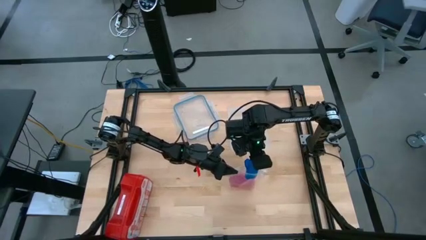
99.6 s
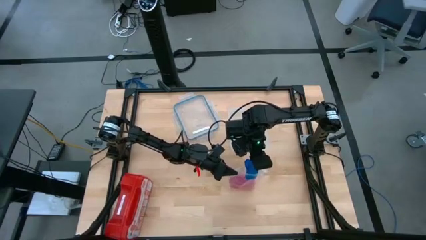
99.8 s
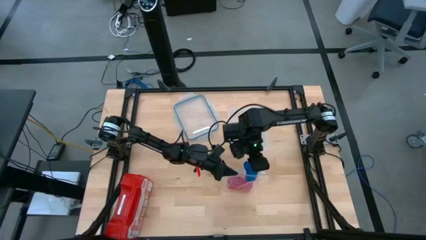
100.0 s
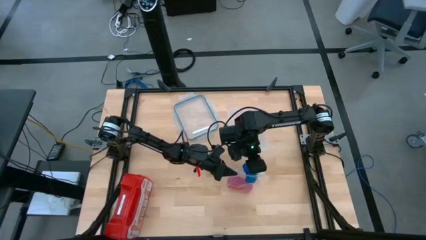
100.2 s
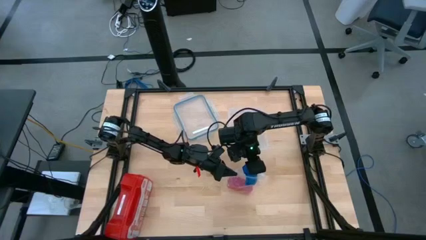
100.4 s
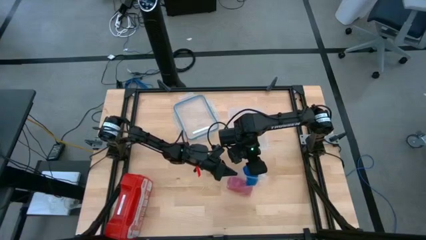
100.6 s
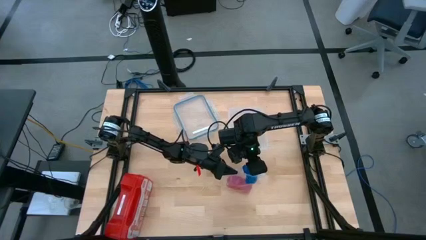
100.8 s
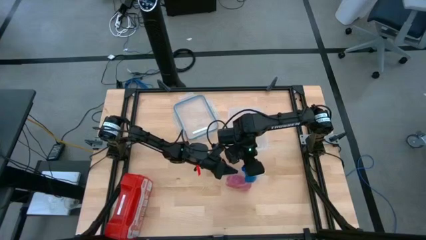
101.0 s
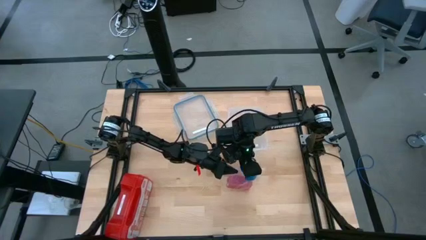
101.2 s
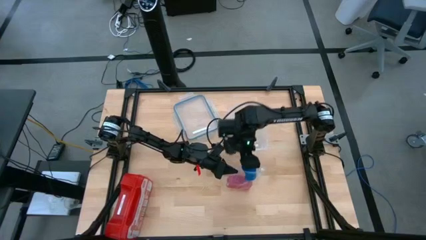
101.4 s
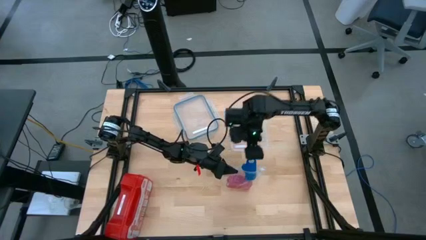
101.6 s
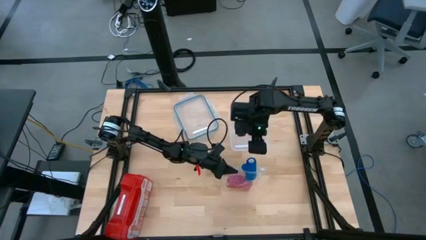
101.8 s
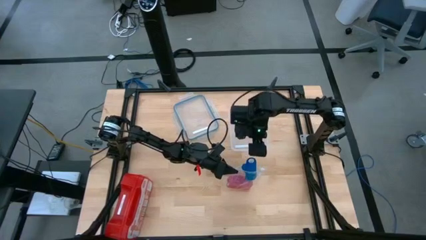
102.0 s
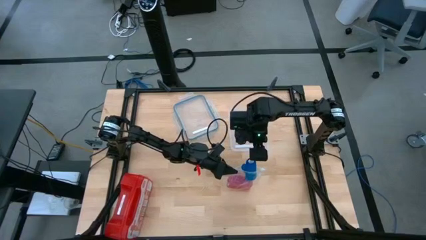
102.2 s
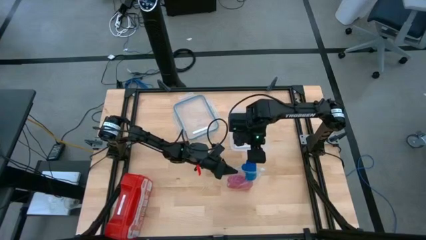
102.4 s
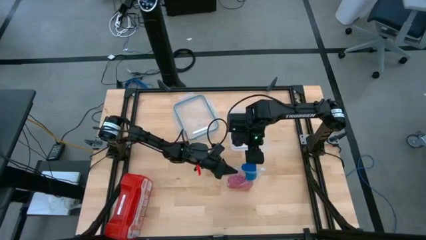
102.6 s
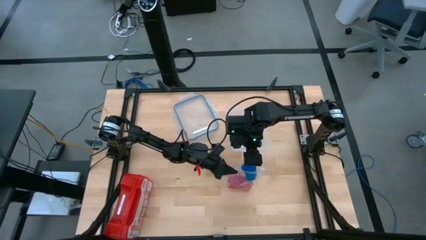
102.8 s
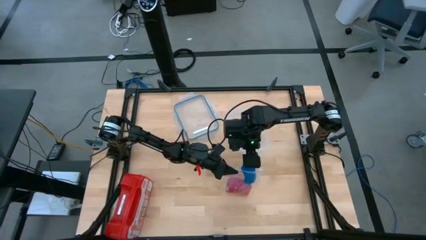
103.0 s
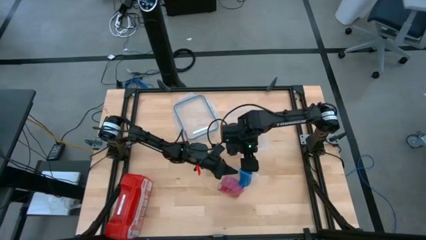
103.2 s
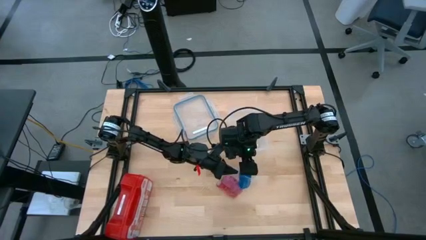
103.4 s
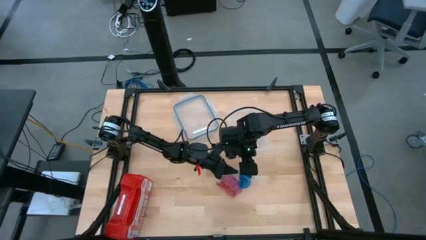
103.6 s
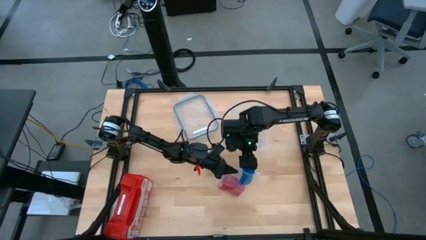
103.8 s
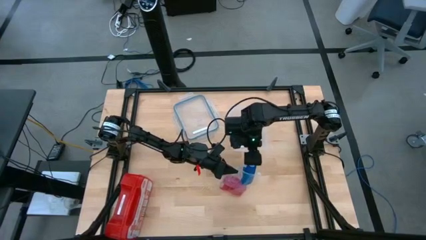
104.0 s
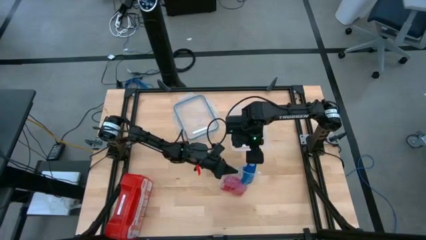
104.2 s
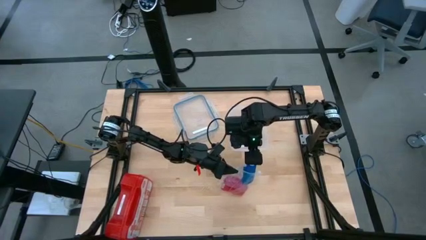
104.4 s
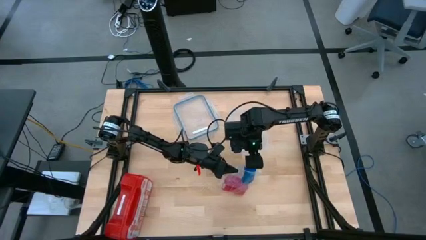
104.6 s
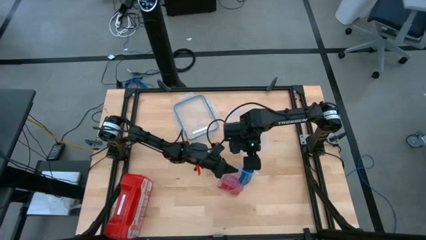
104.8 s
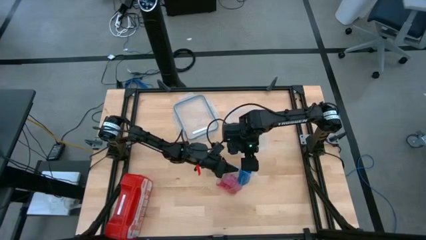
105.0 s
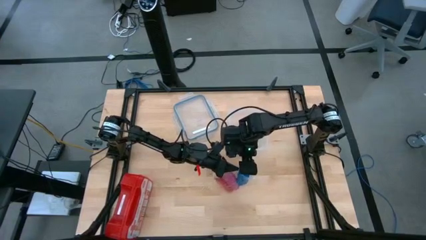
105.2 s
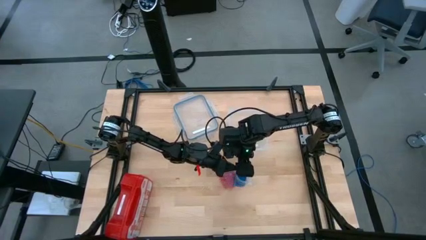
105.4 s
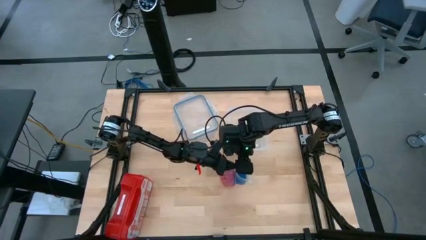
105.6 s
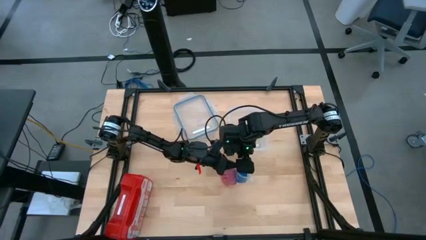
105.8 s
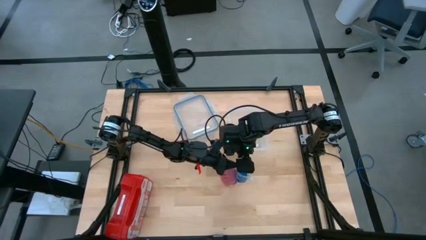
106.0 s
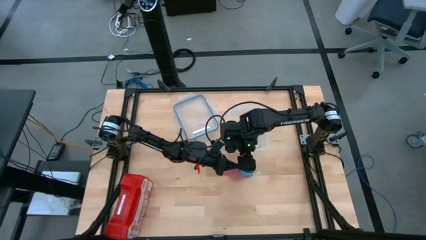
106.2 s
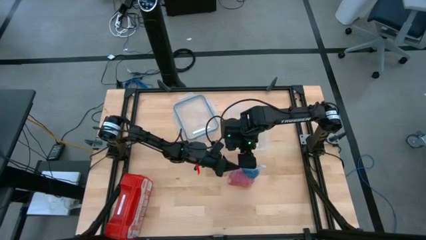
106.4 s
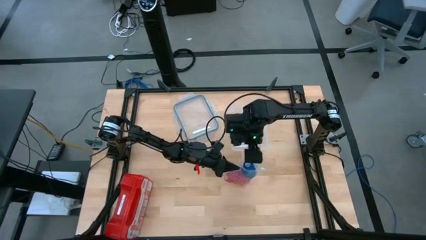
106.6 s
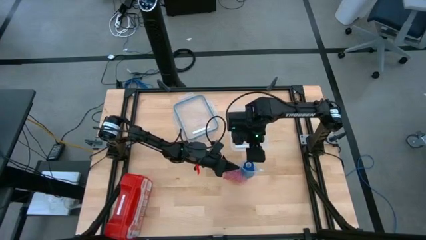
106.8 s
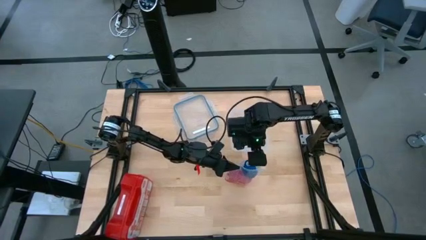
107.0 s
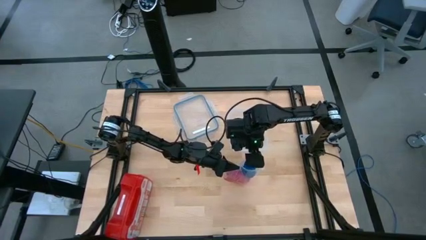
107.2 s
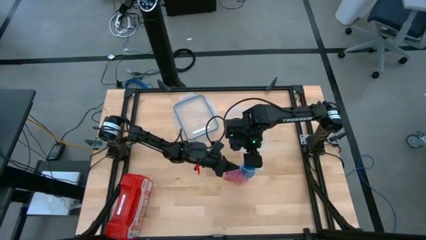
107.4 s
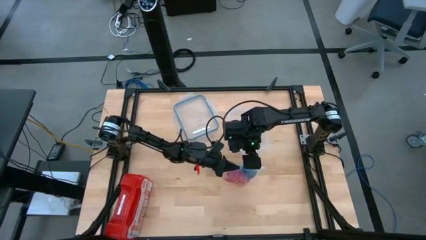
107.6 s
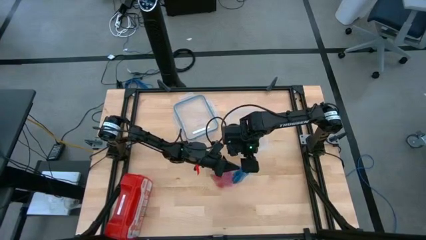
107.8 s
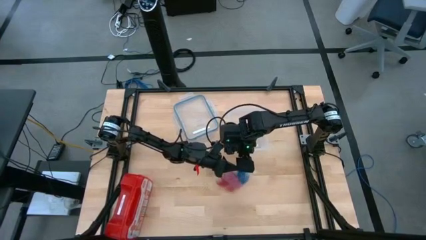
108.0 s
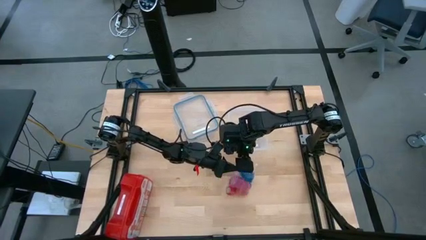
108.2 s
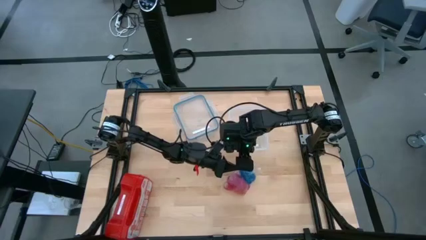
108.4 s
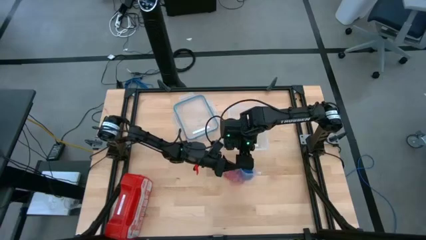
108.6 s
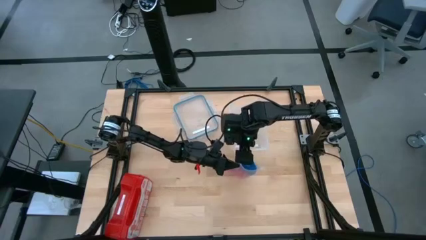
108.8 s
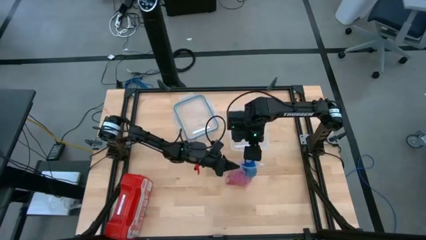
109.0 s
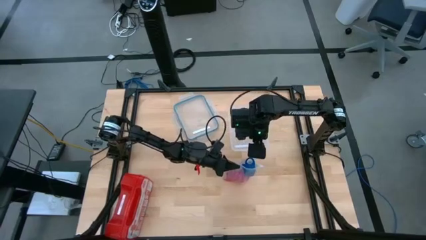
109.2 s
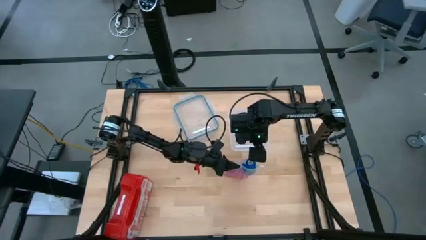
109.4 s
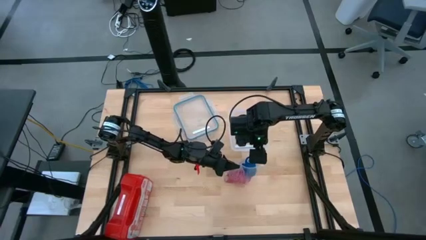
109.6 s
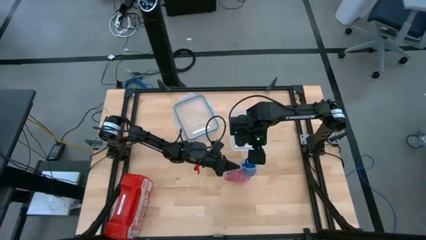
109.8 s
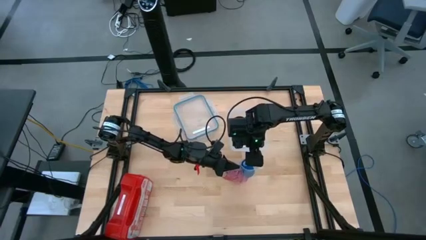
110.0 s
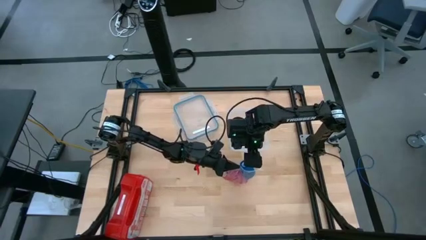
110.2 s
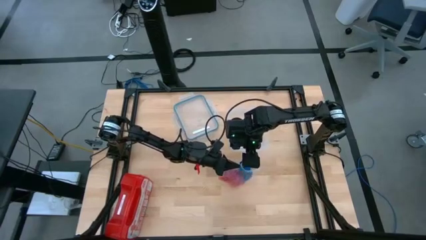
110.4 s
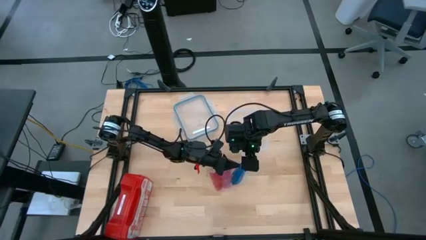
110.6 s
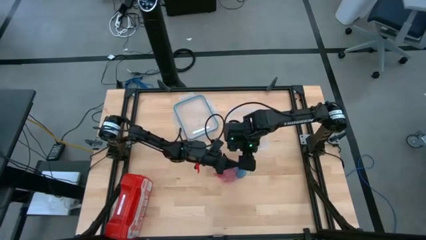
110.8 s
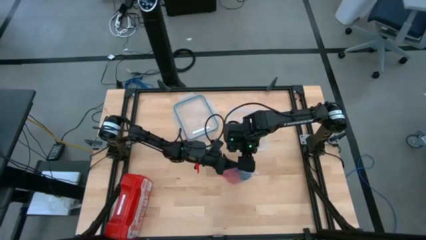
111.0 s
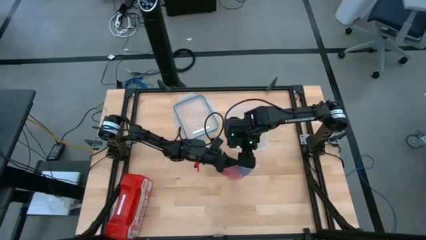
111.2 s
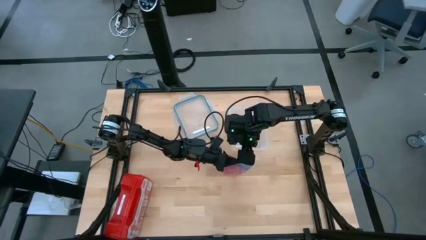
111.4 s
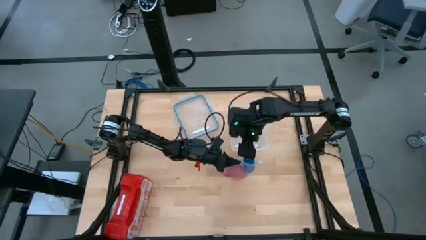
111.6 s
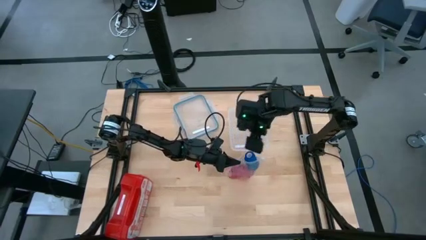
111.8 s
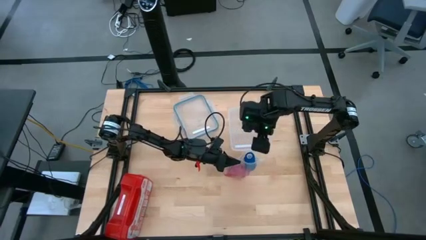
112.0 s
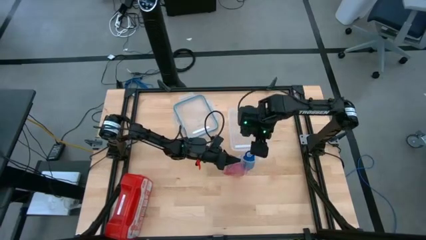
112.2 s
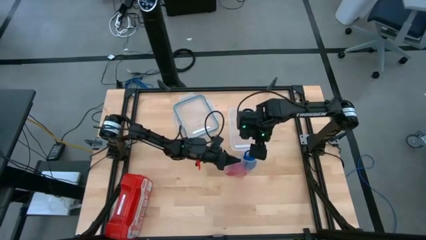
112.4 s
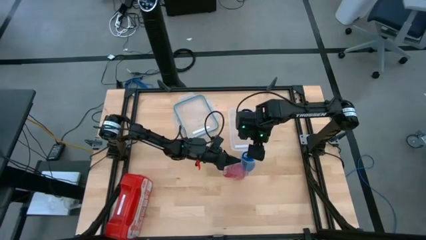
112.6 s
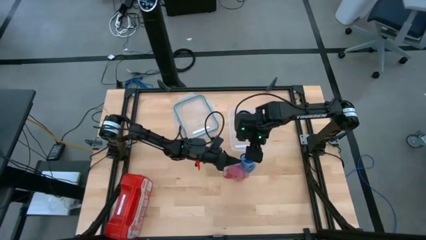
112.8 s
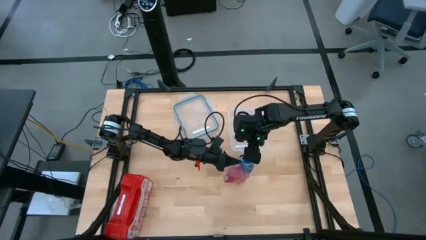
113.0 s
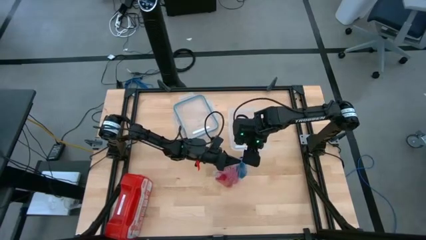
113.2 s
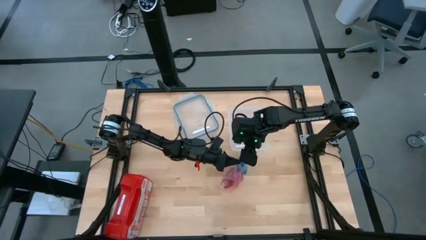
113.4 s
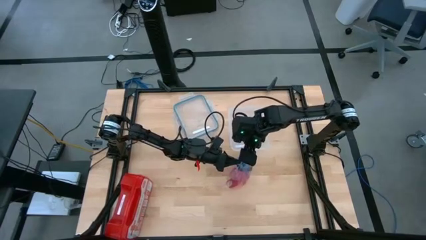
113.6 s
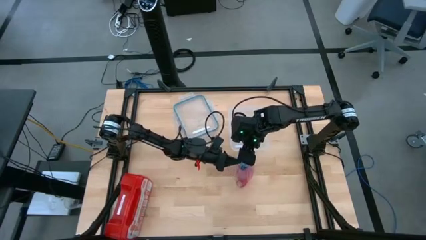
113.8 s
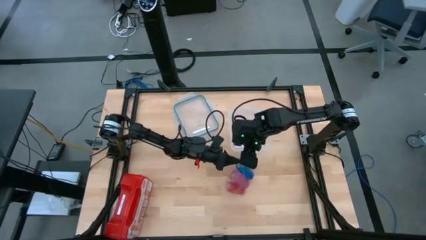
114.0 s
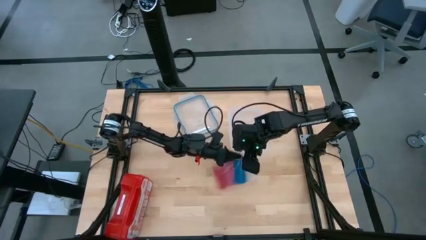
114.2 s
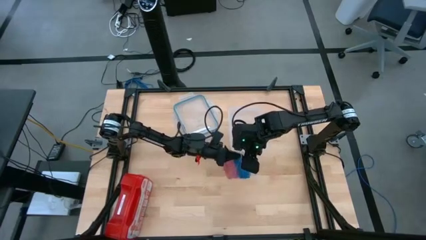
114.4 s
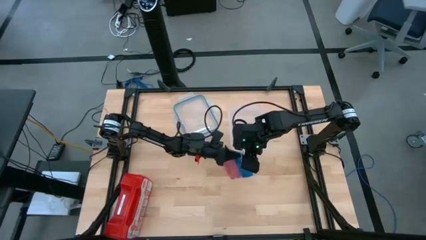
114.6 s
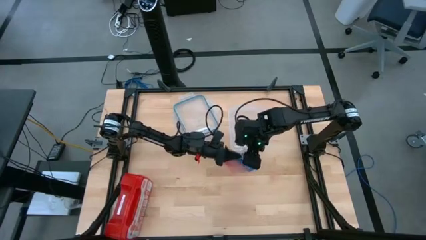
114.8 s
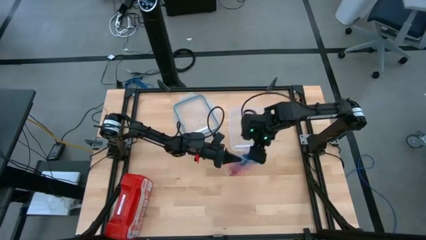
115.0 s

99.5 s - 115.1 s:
Task: Roll bandage
Put the blue bandage into the transparent zip bag
